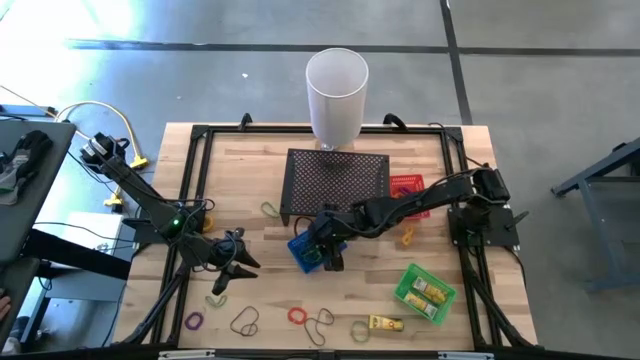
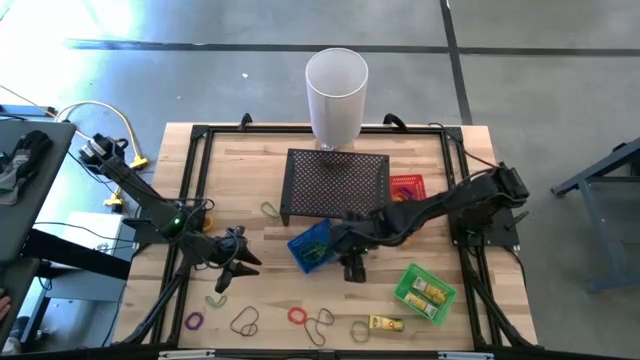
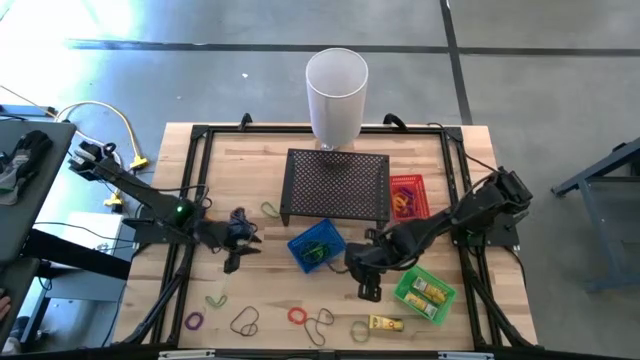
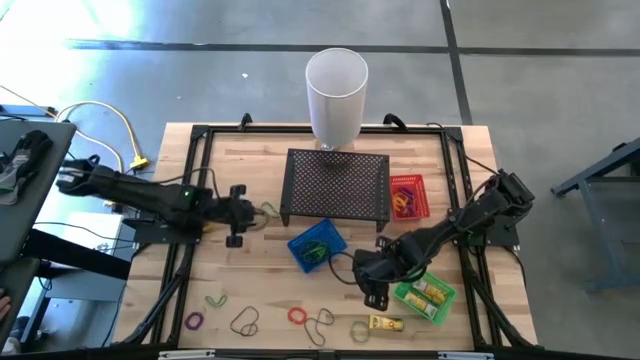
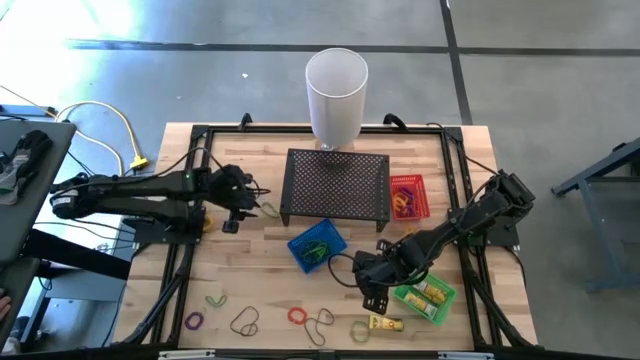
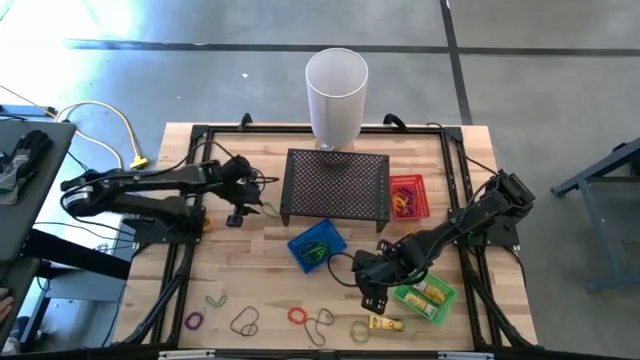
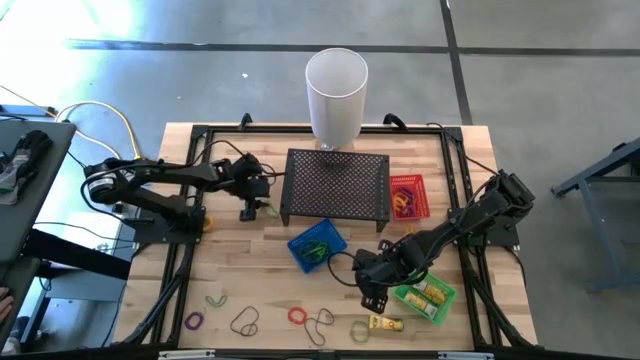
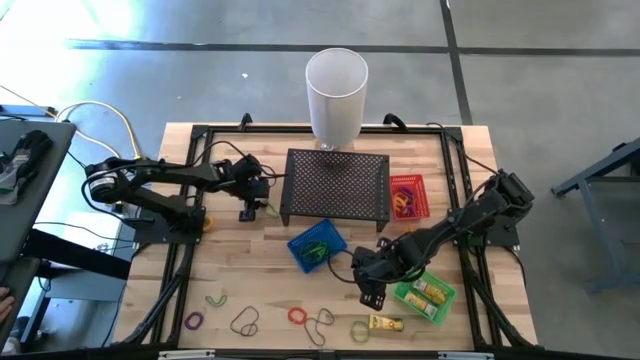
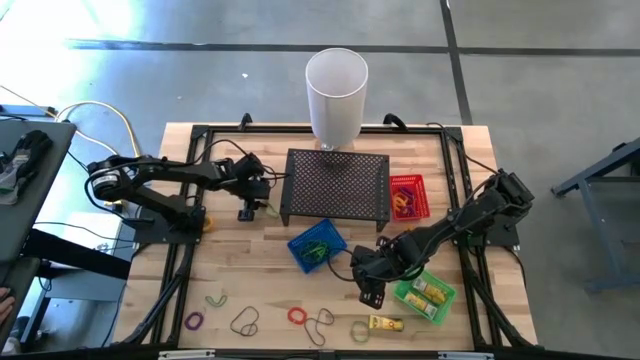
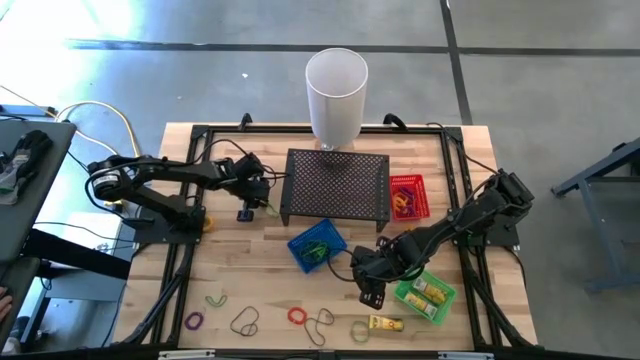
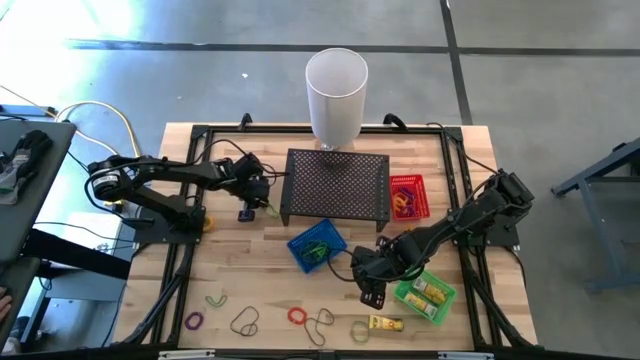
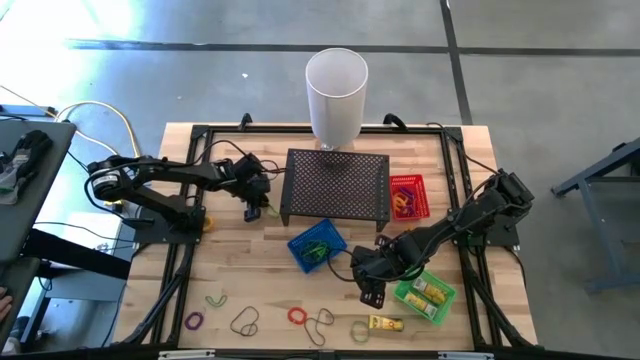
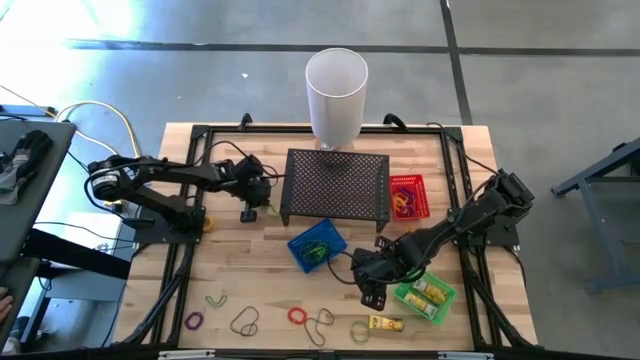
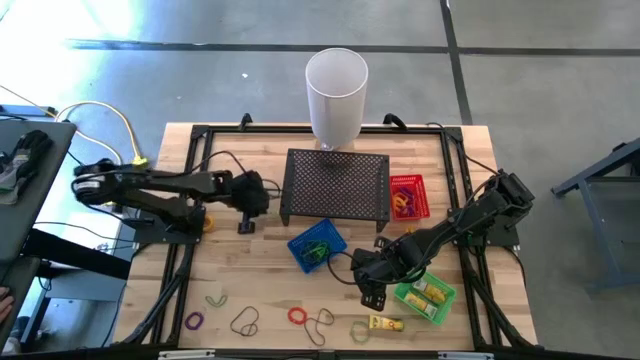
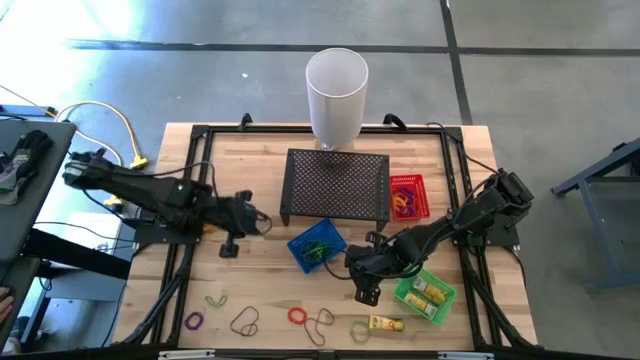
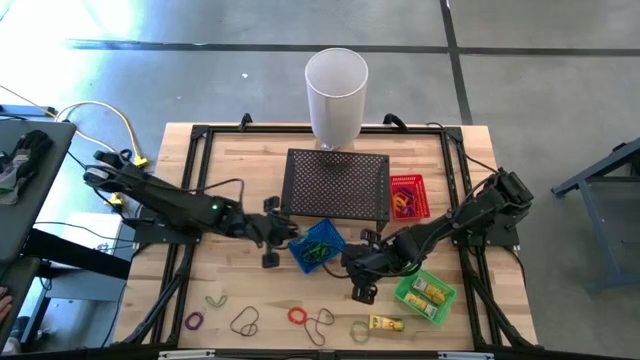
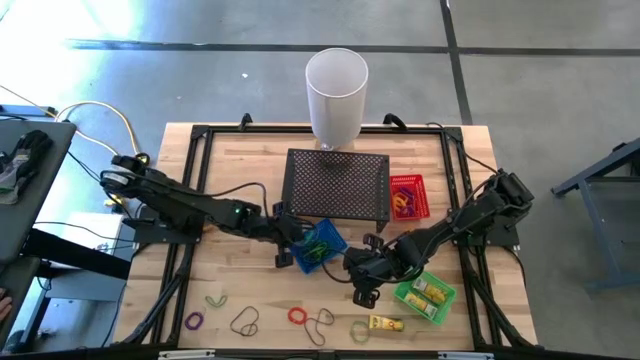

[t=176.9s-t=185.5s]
Task: Pick & Place Office Desk Supplies
Put the green rubber band into the blue bin

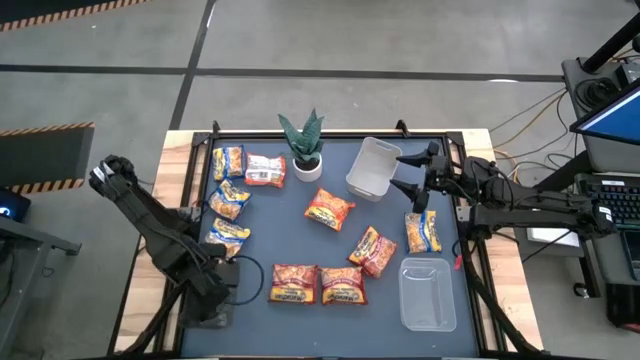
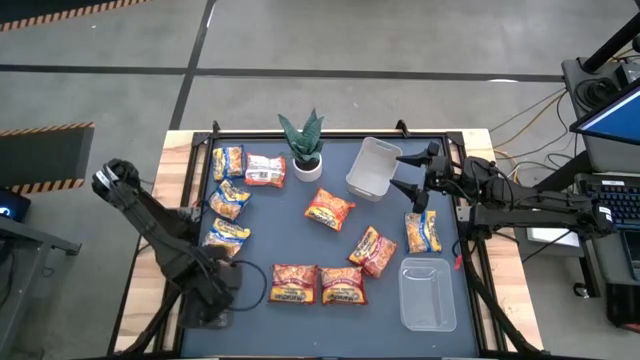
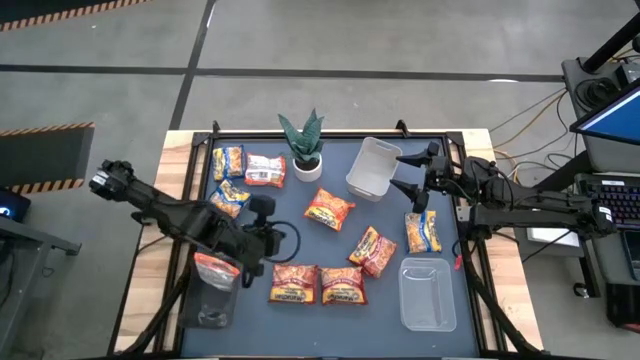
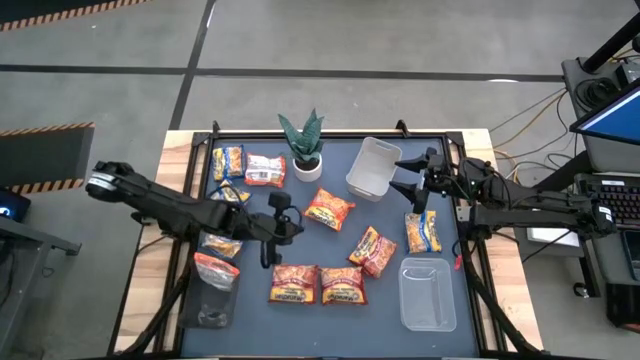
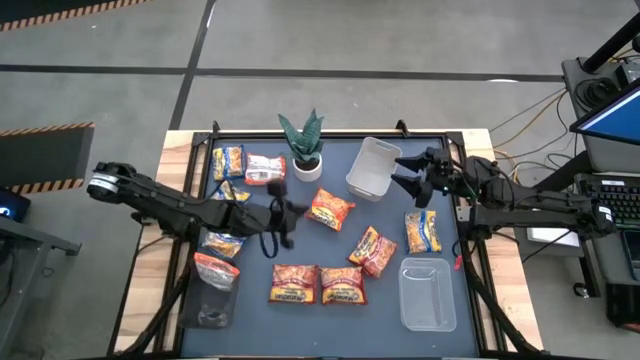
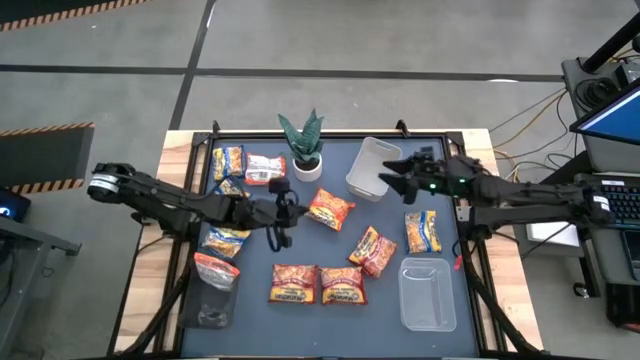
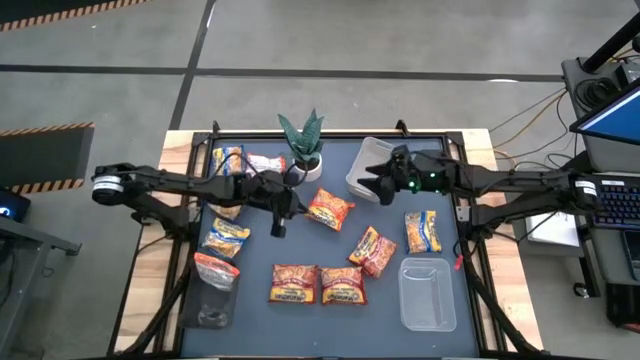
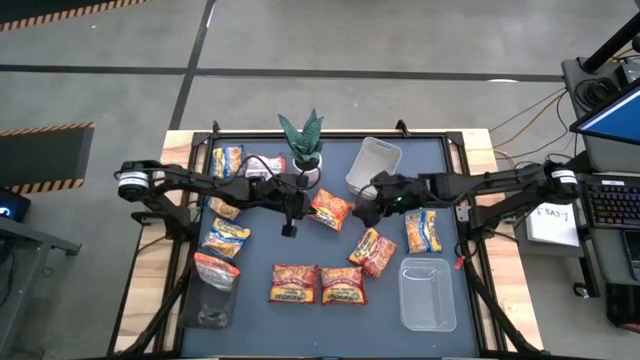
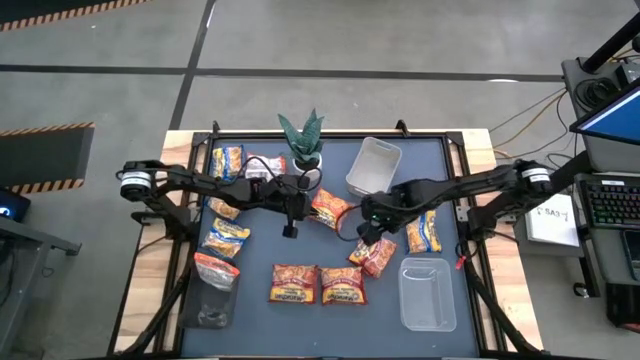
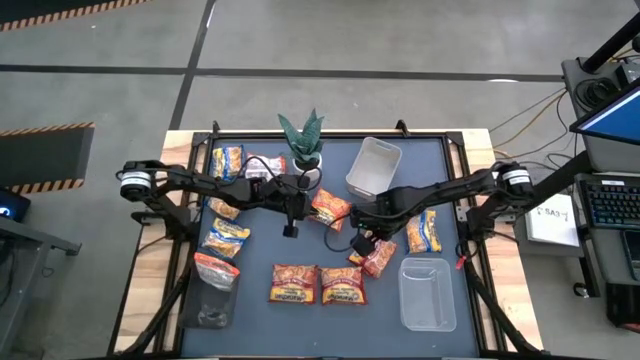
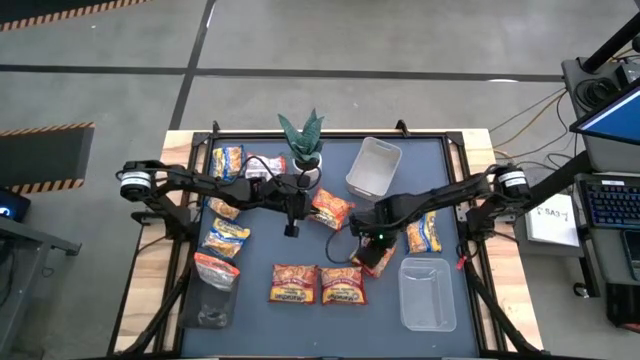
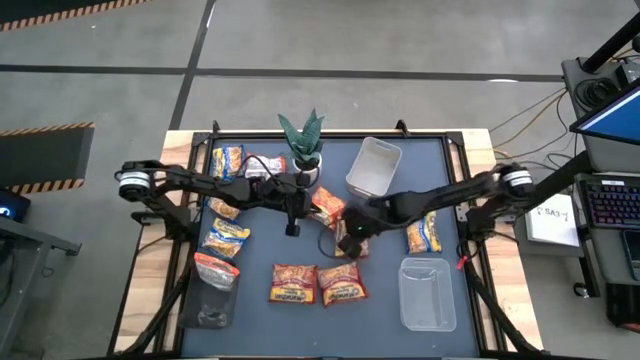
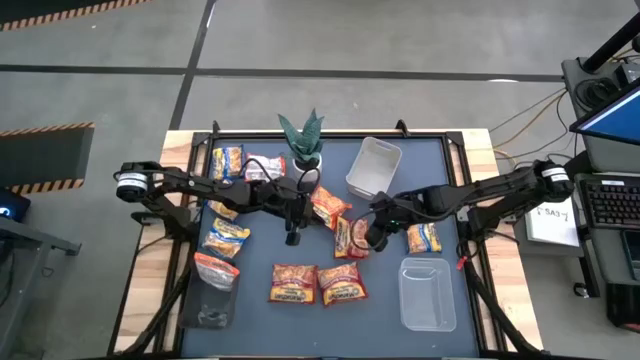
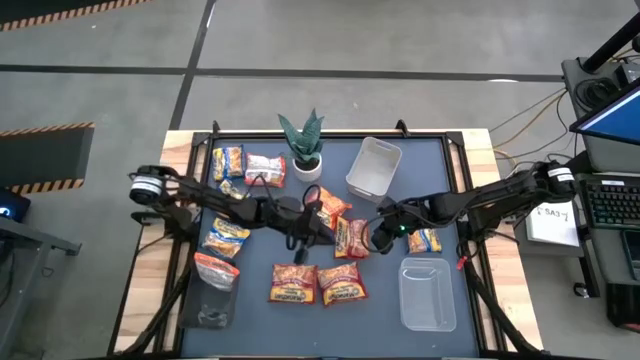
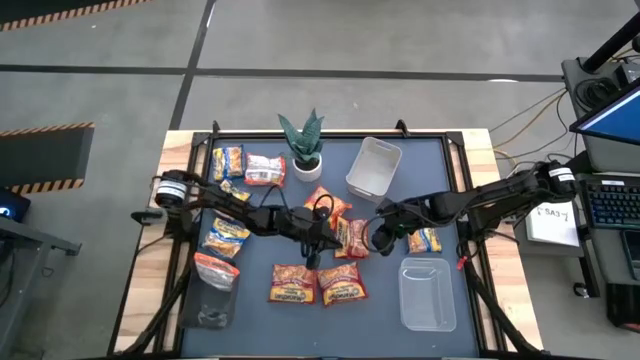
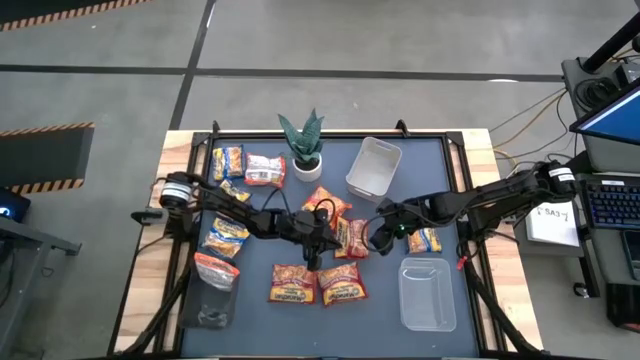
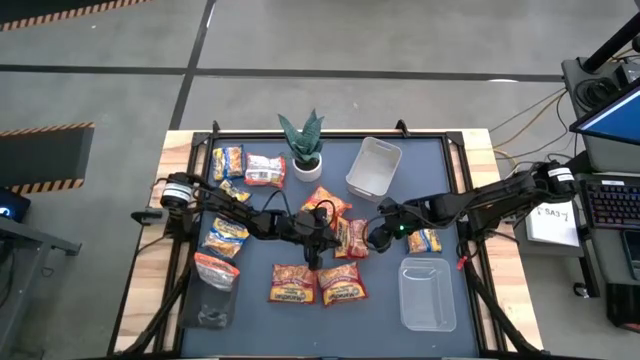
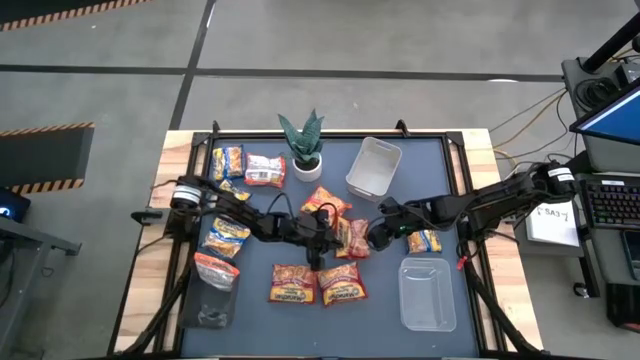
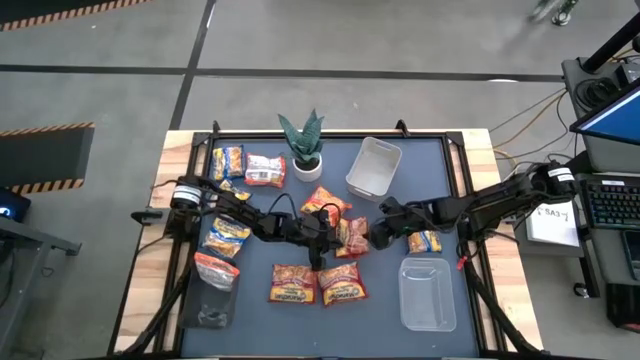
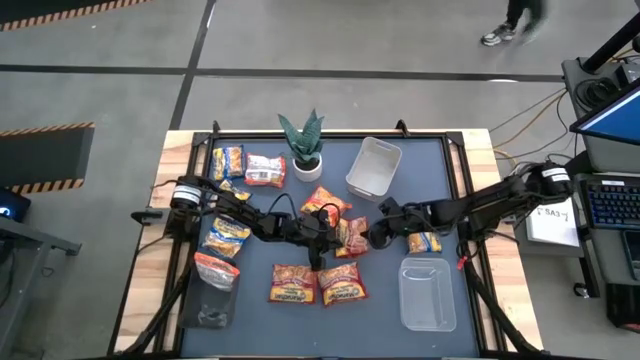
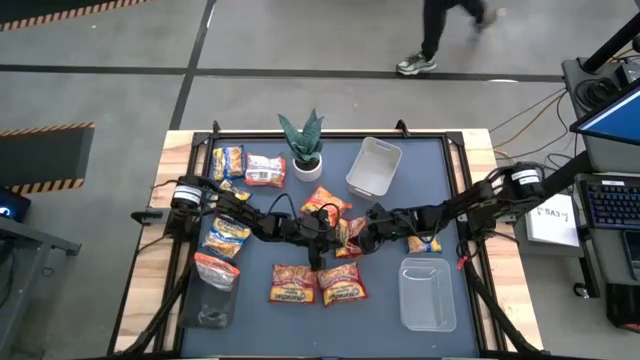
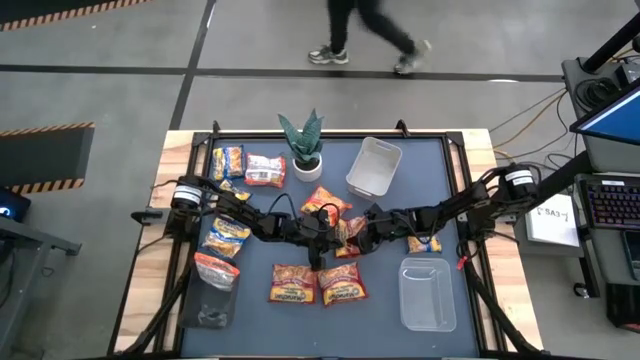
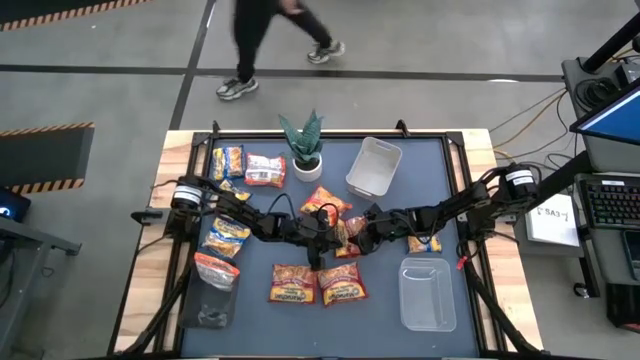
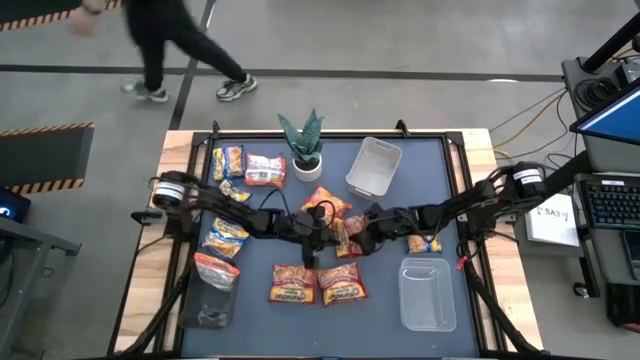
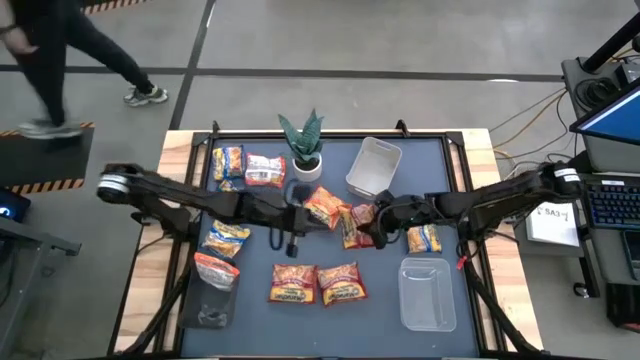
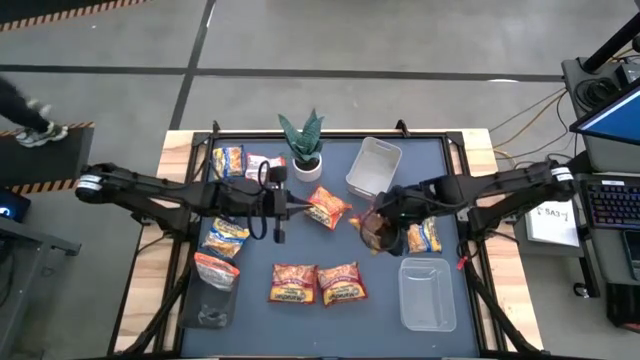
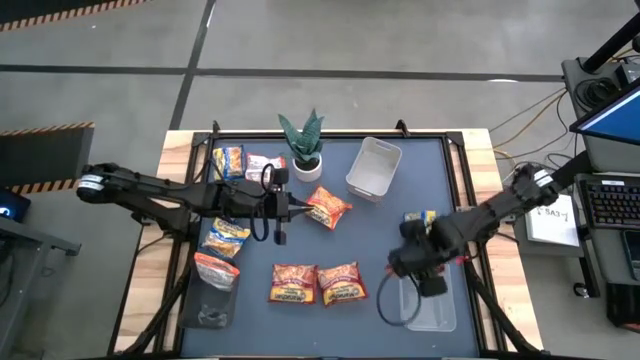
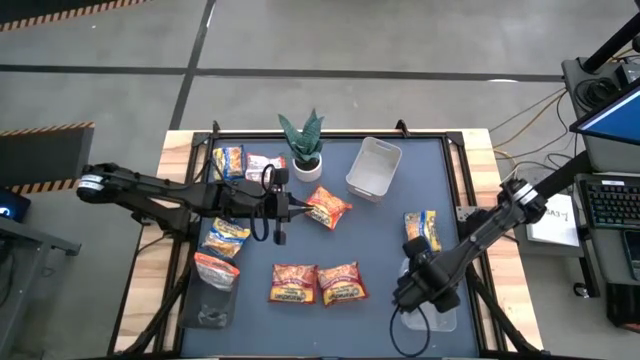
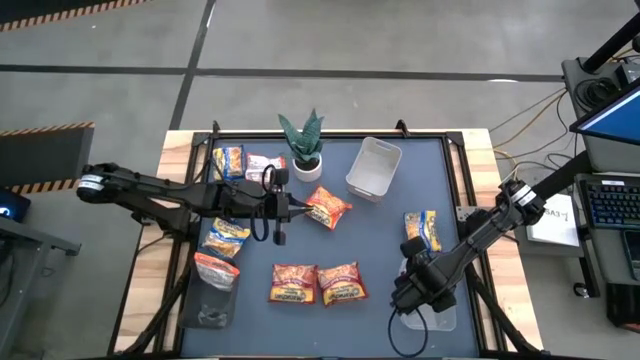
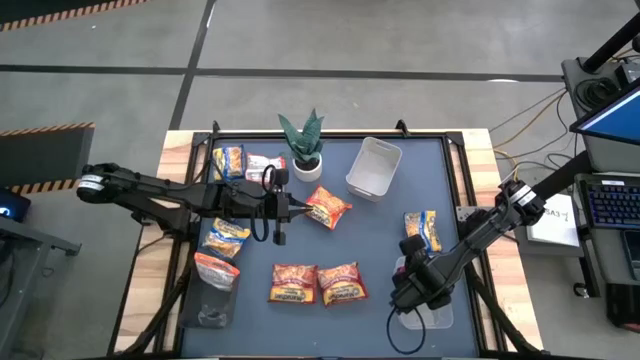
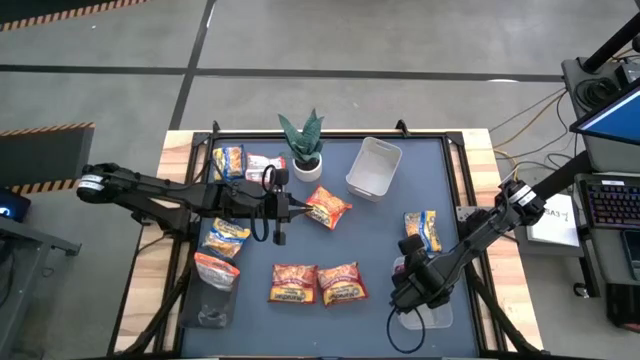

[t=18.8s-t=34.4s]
Task: Sort Maruchan noodles
Put the middle right red instant noodle pack into the transparent bin
